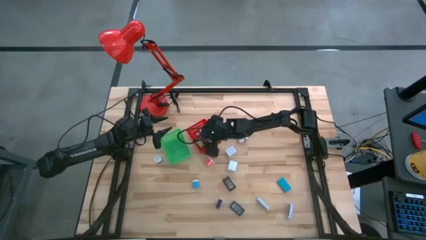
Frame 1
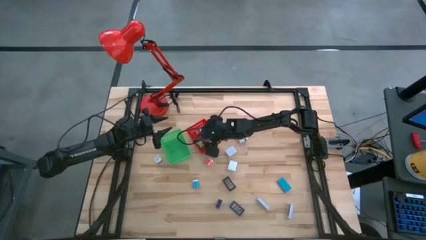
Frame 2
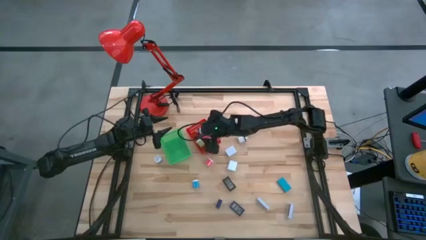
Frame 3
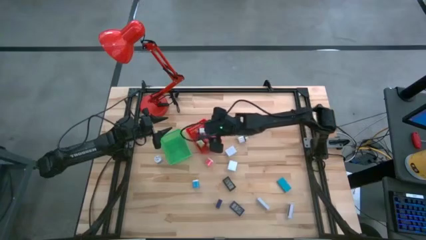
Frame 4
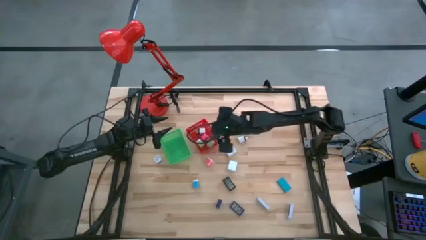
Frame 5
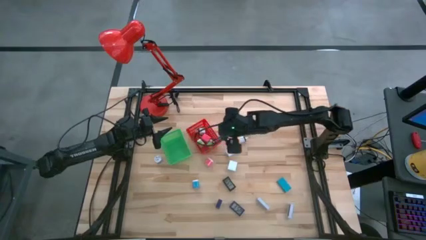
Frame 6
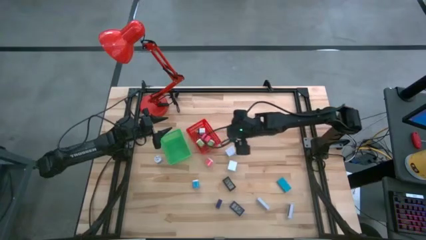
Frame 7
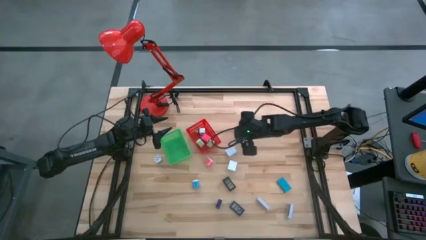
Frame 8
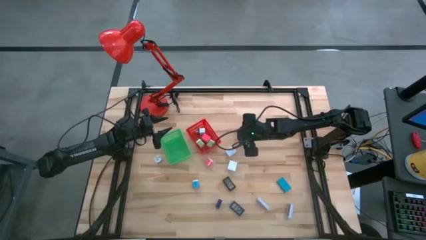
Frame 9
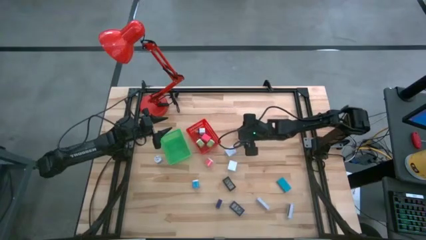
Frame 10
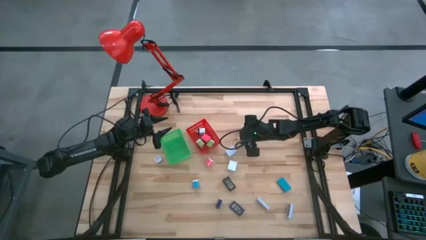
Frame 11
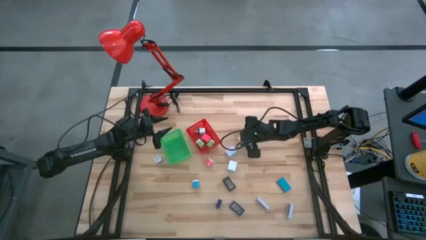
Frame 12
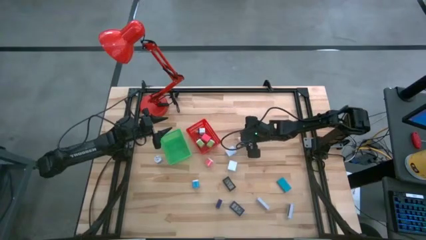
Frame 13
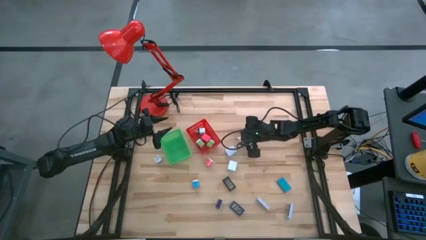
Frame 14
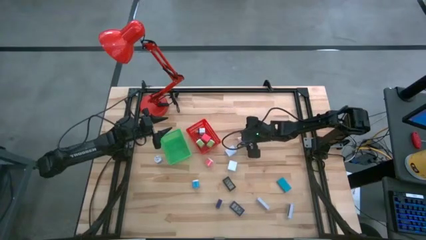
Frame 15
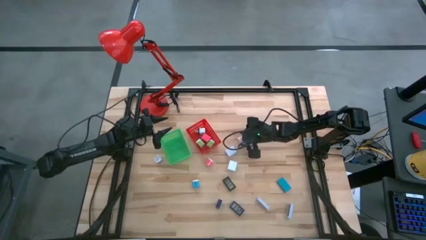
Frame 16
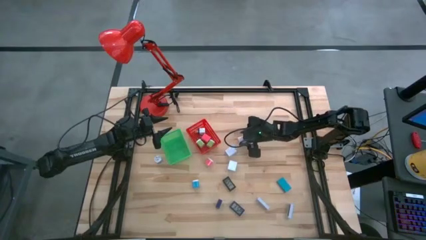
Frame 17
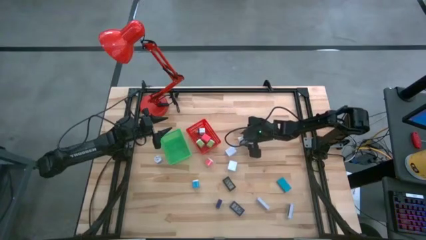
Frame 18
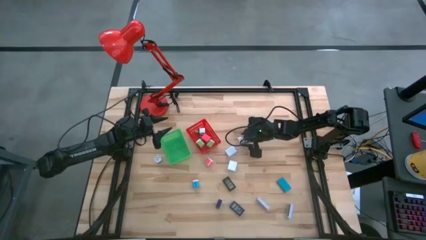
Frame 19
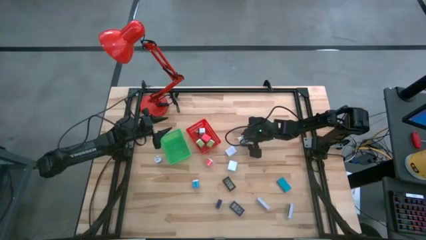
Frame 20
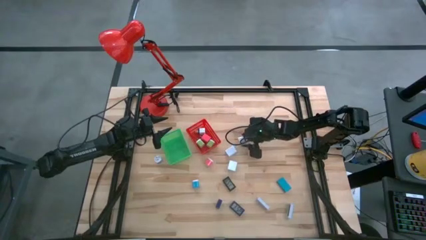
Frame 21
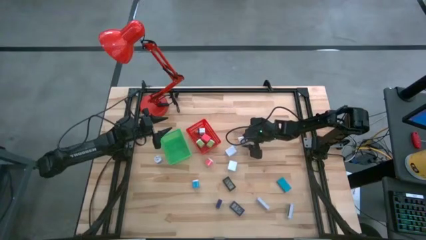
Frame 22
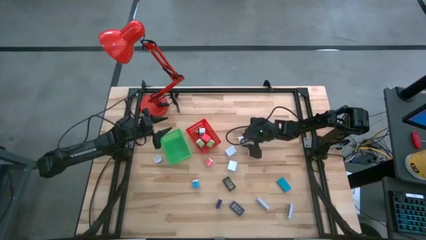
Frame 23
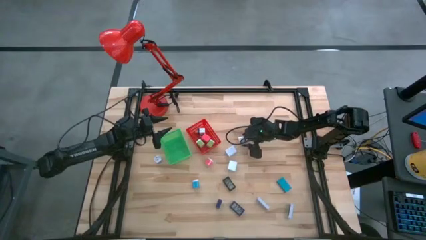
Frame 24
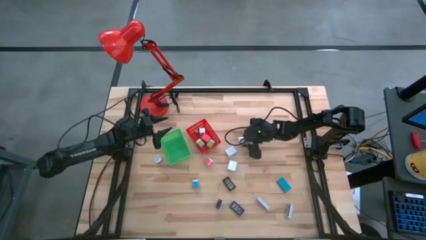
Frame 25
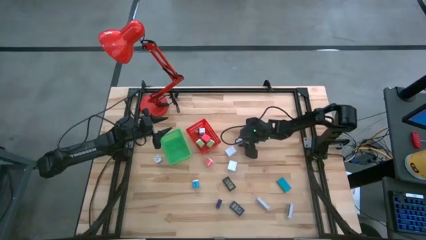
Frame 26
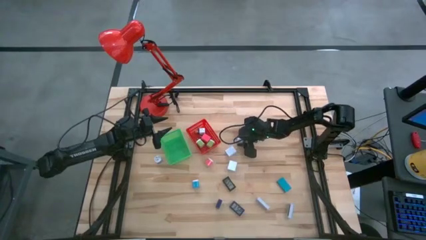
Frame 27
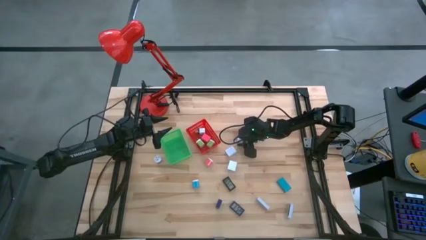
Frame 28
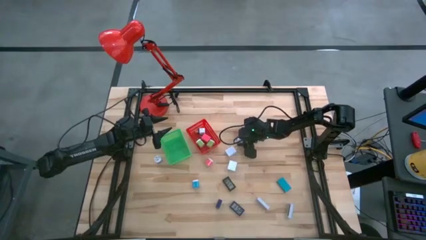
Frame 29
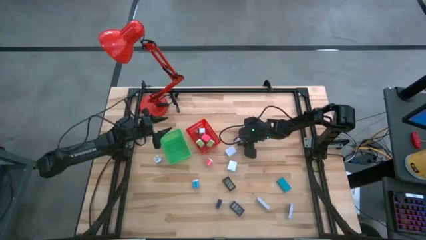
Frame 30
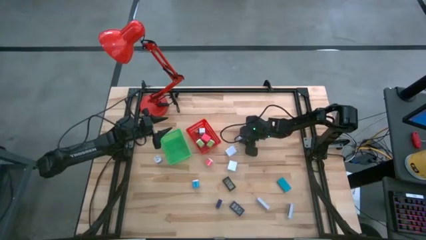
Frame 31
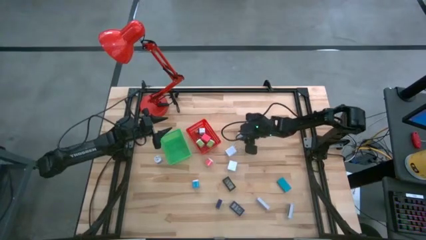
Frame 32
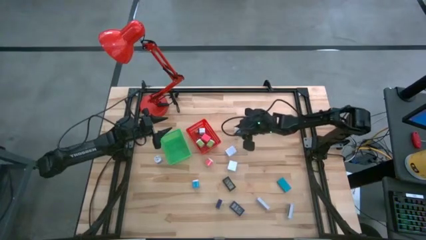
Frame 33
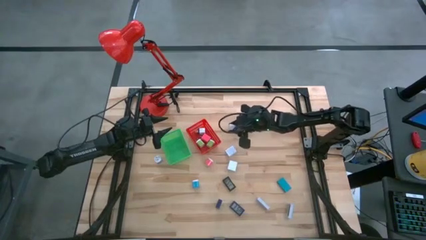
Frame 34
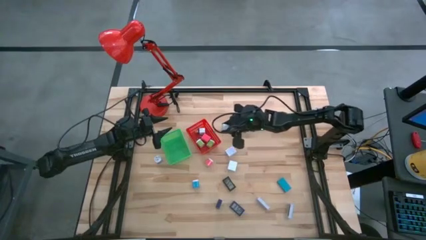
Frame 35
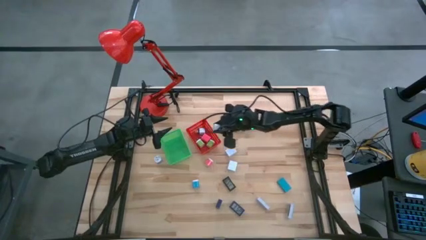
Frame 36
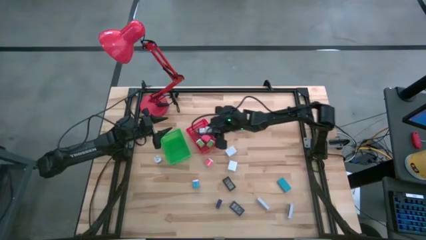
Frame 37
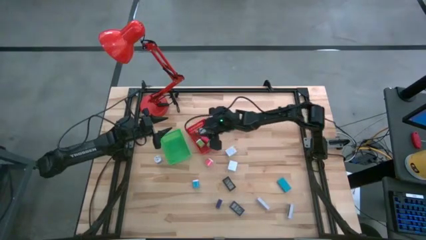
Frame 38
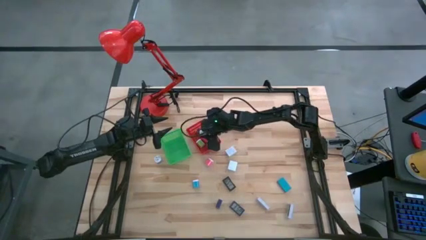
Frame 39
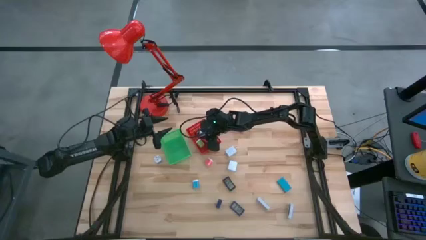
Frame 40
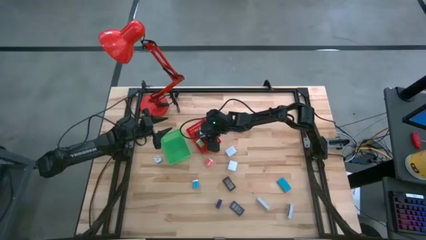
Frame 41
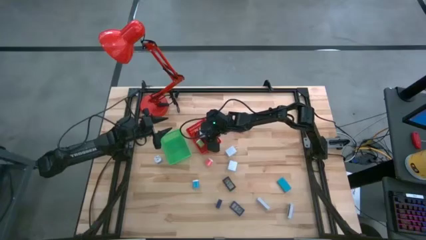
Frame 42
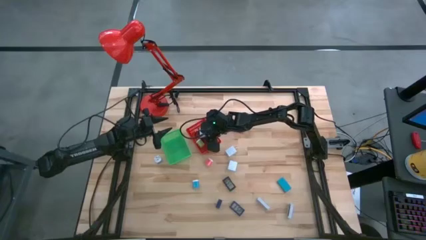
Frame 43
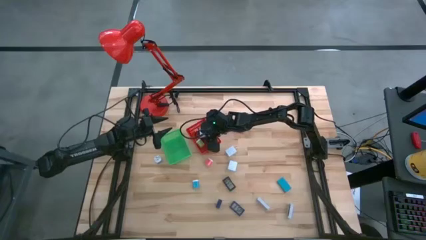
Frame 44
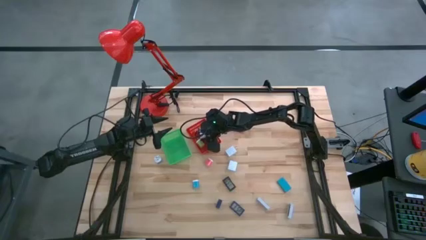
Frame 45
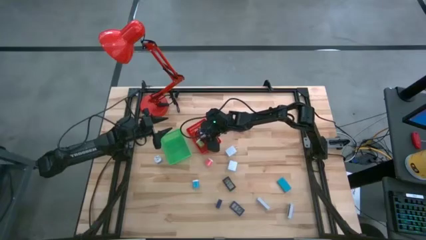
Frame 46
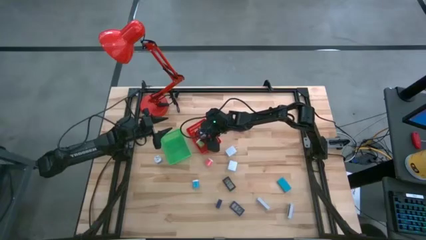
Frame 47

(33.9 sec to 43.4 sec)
Task: Pick & Place Office items
Put the white black charger adapter into the red bin

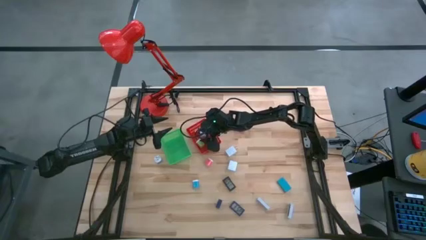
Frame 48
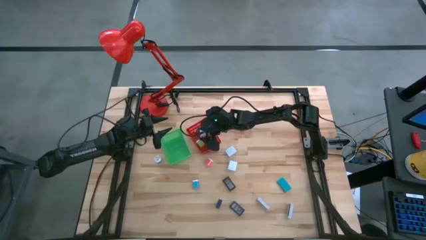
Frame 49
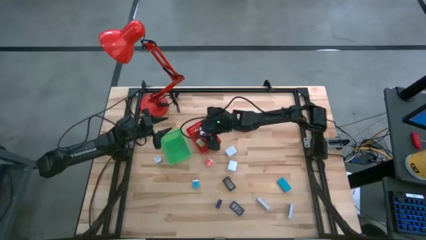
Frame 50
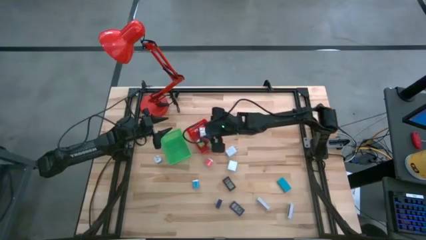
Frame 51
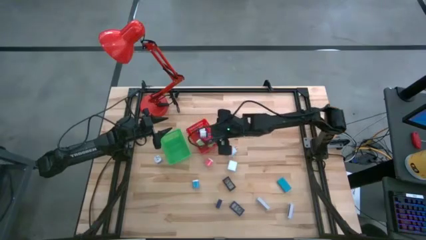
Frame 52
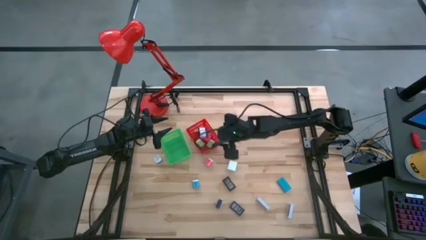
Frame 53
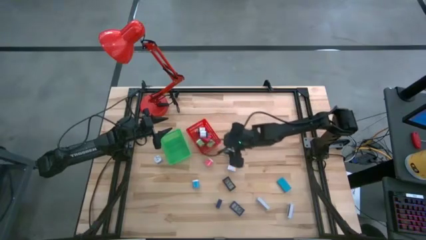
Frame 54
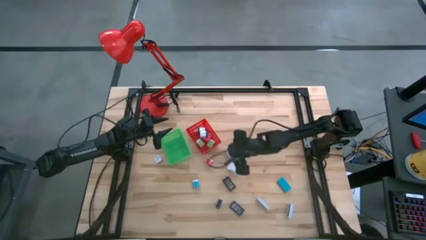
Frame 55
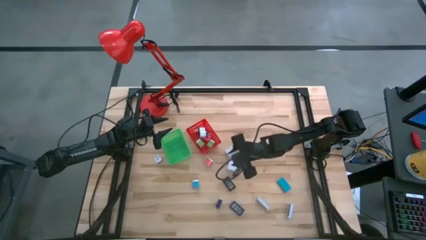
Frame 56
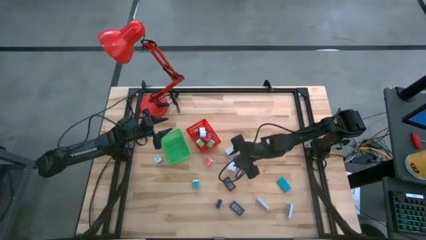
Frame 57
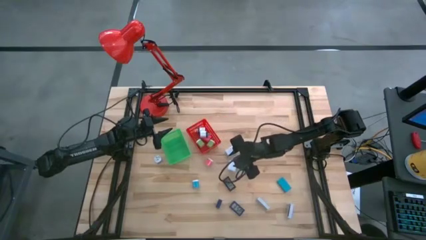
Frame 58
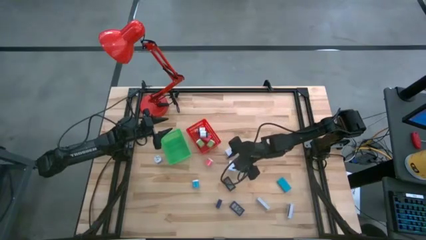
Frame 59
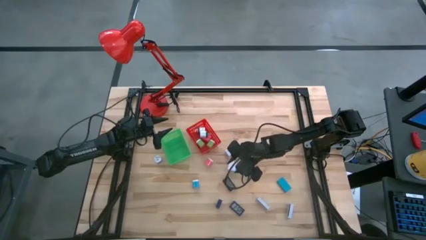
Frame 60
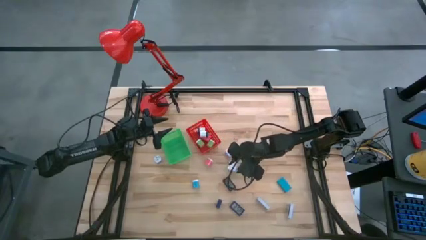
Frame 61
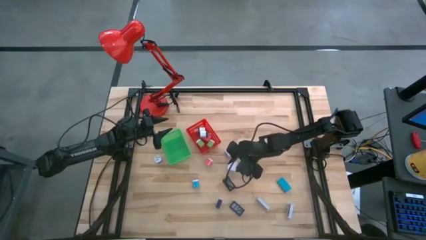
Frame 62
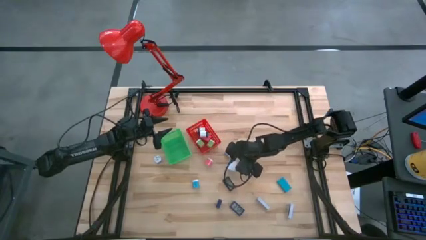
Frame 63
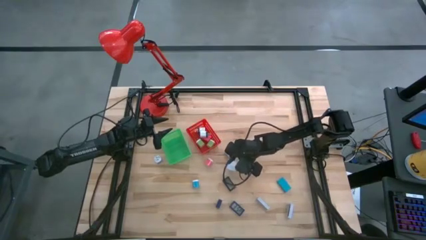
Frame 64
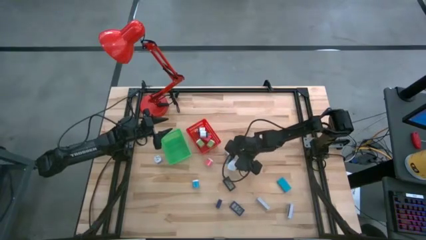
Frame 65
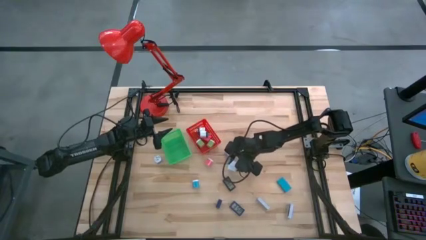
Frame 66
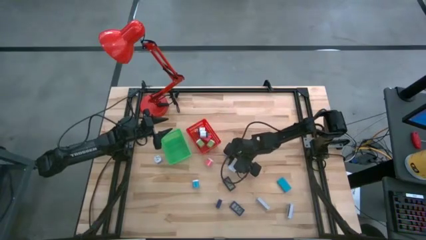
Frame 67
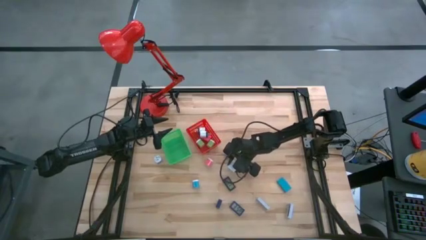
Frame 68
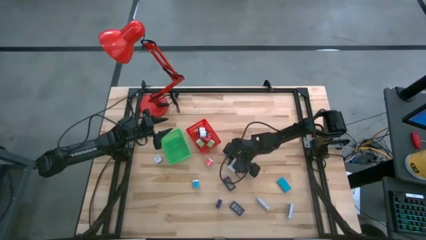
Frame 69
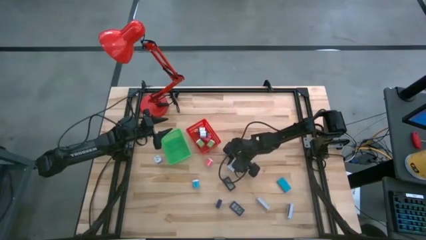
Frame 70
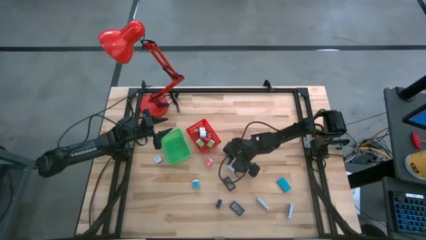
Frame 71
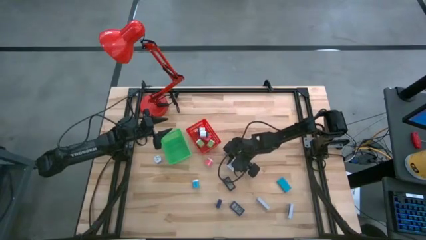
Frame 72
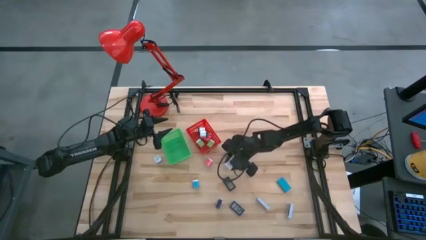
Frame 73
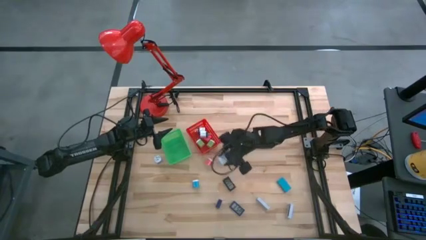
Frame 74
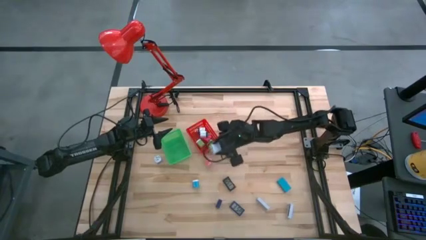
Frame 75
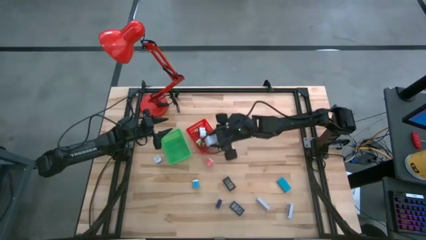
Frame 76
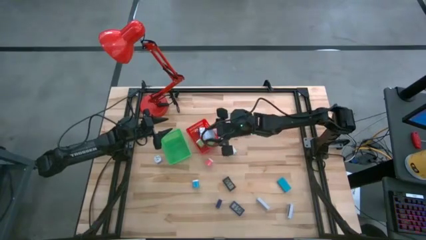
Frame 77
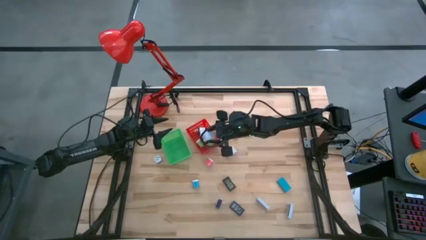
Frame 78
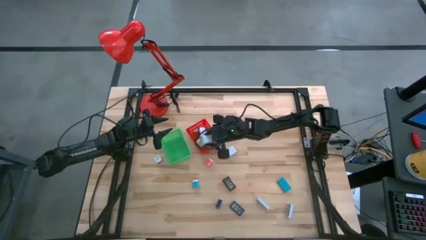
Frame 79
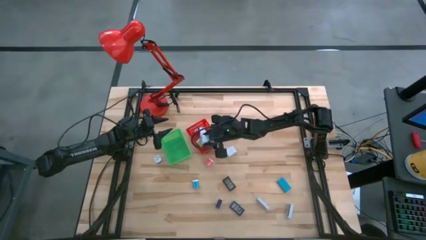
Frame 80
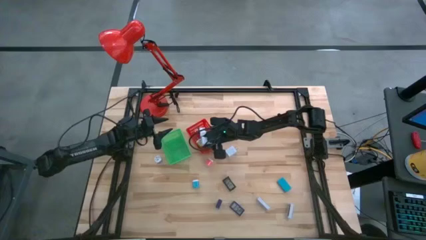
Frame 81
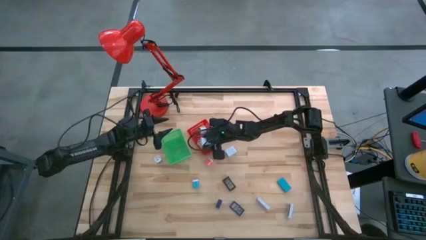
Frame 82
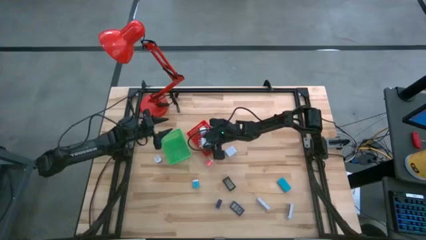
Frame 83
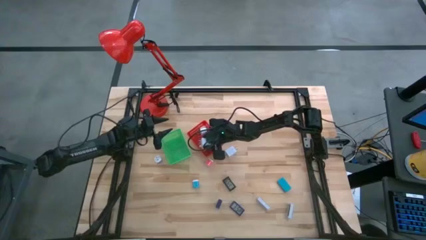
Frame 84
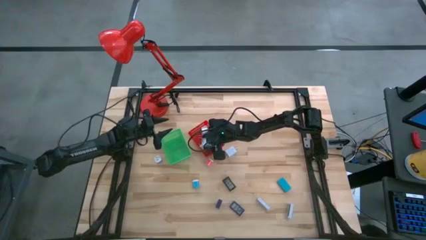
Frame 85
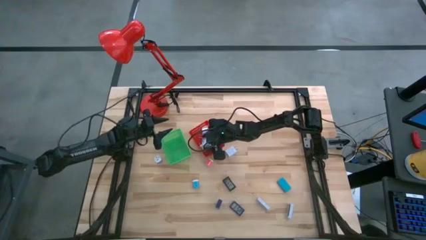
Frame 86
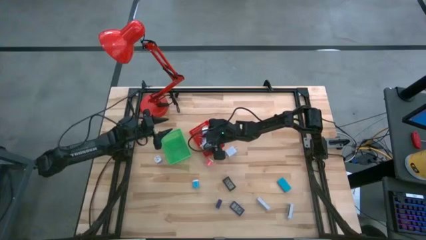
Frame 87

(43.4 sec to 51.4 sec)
Put the bottom white charger adapter into the red bin
